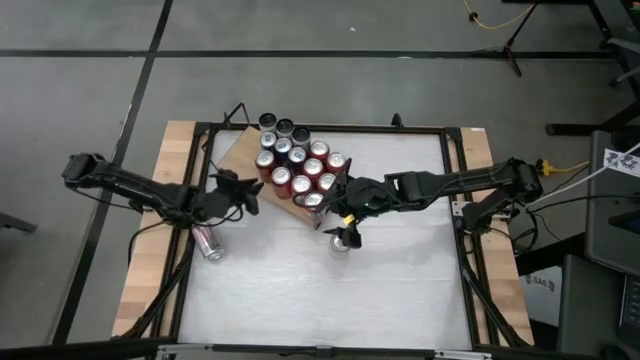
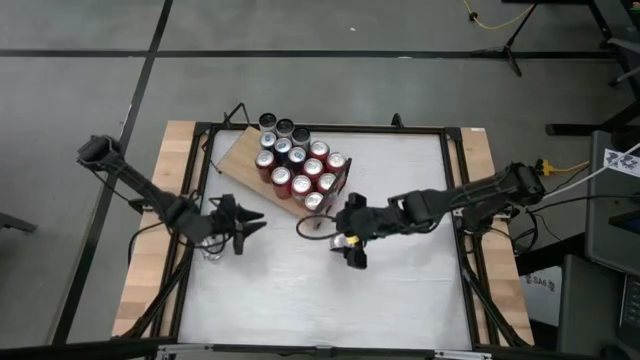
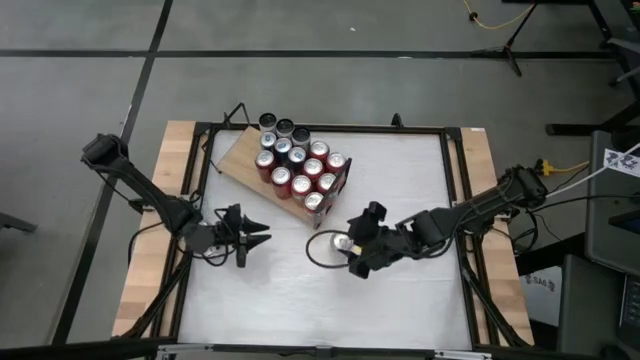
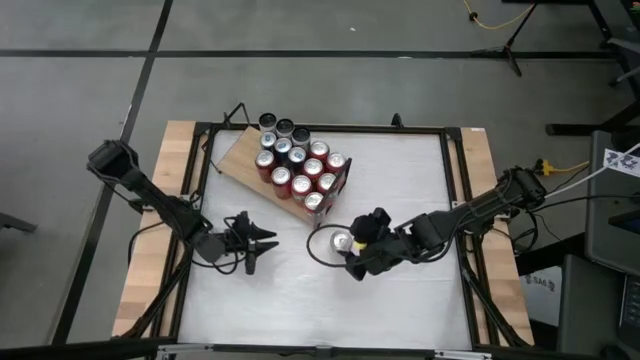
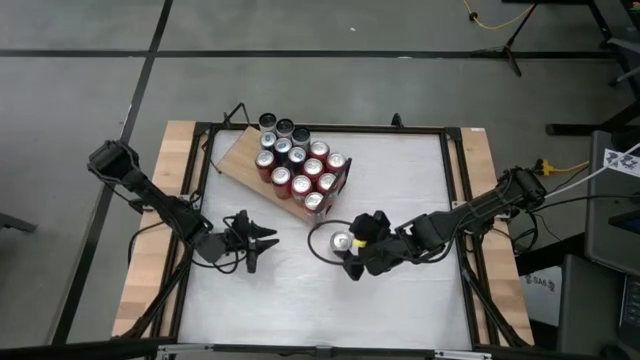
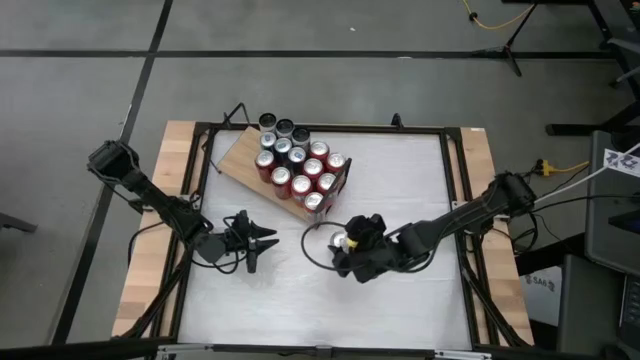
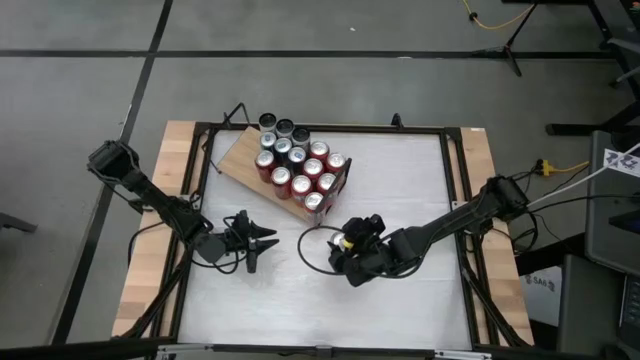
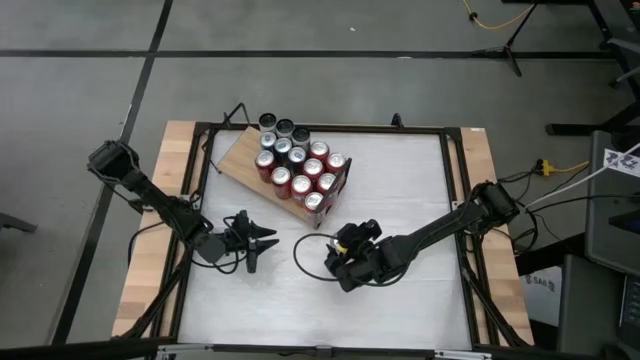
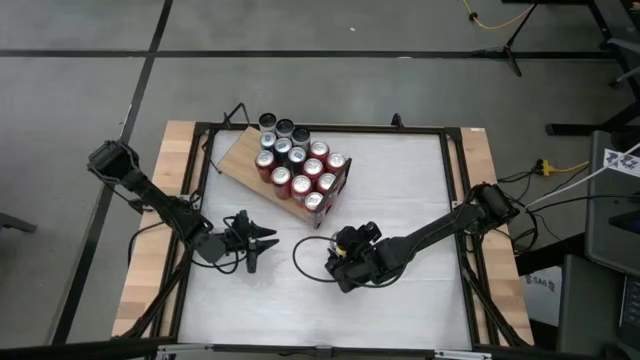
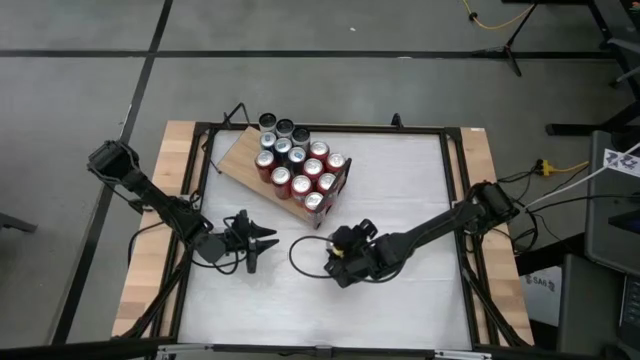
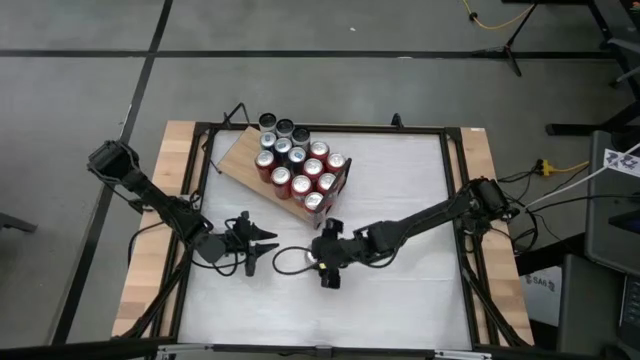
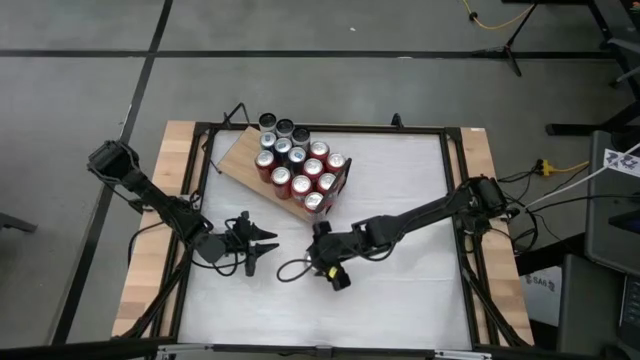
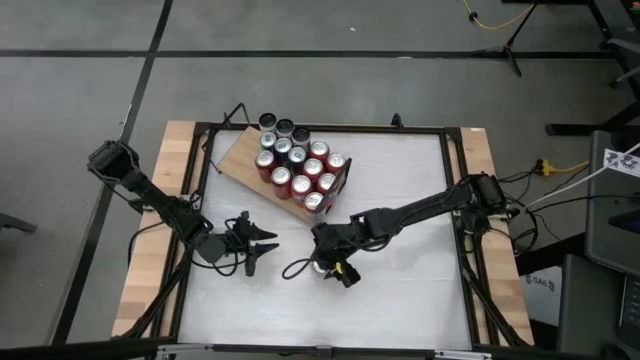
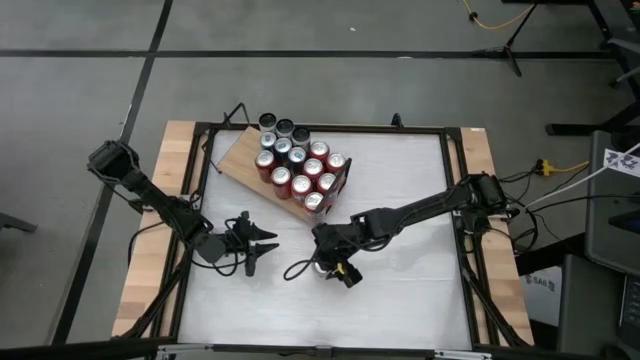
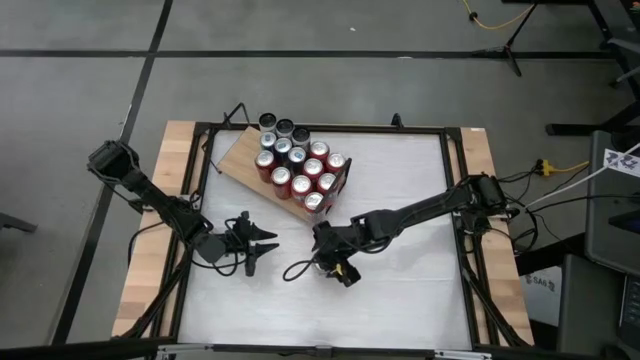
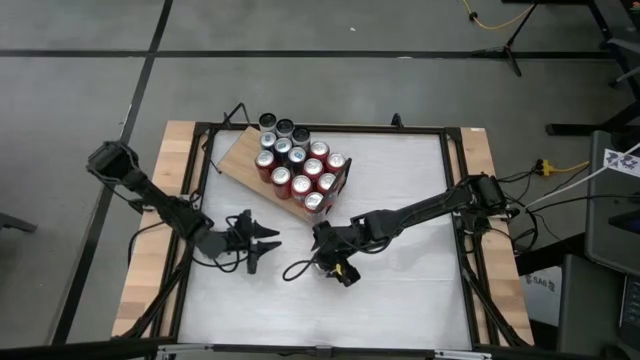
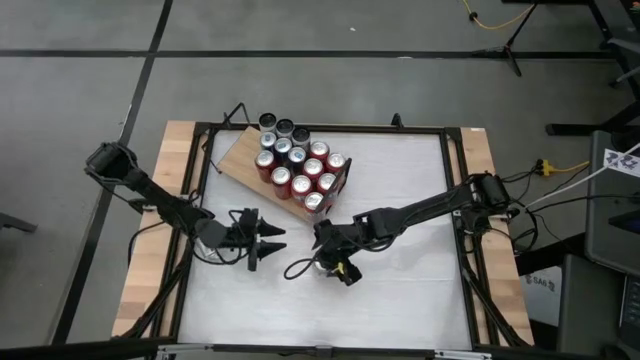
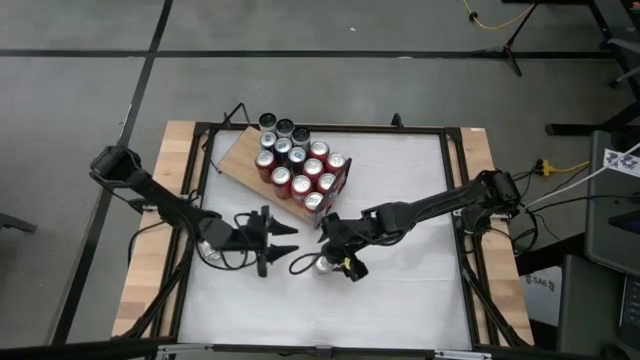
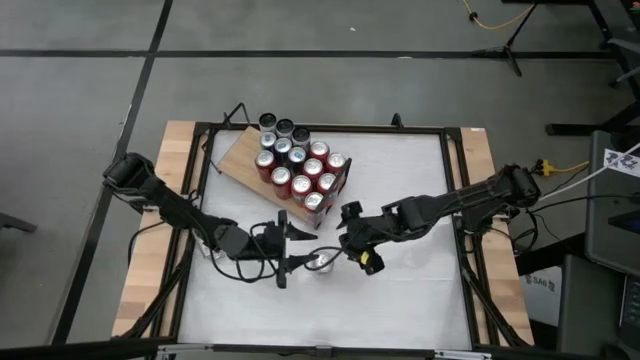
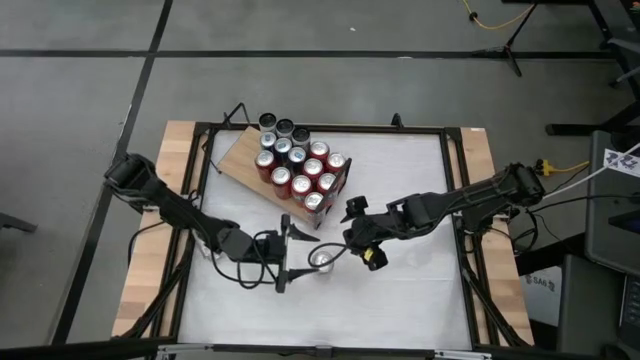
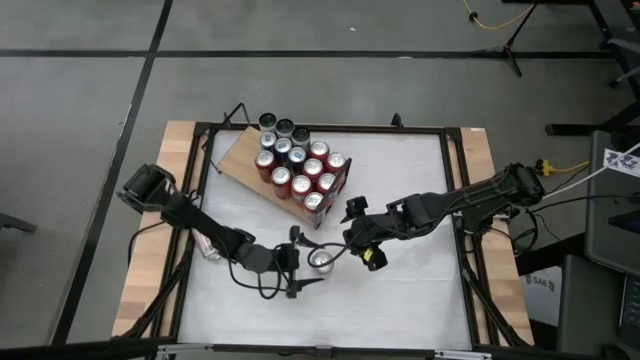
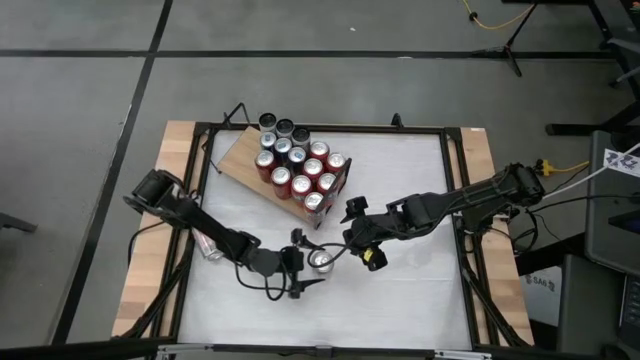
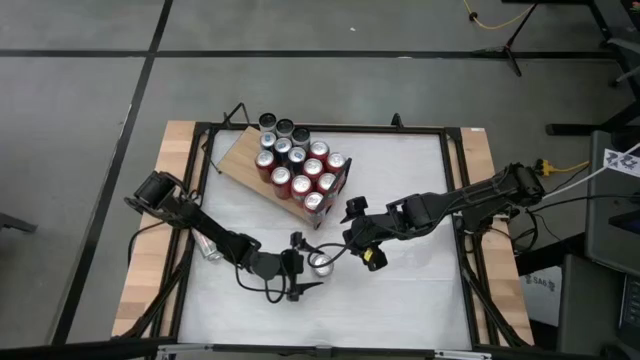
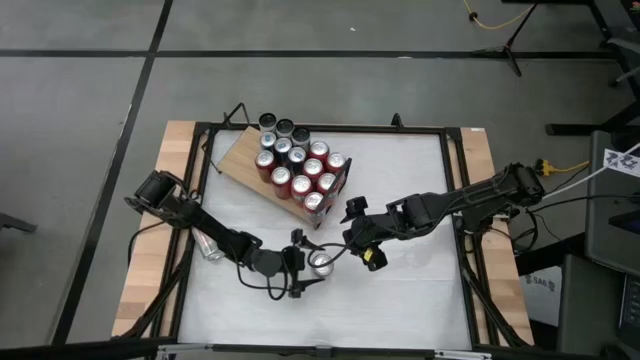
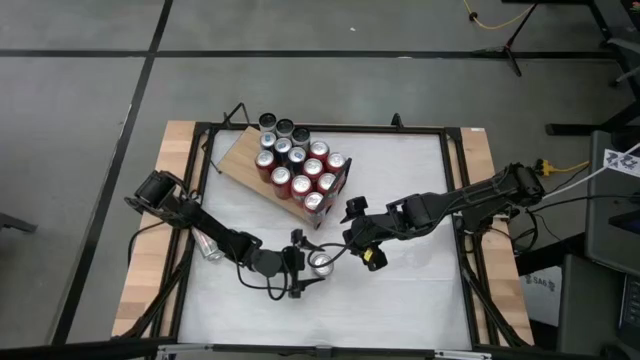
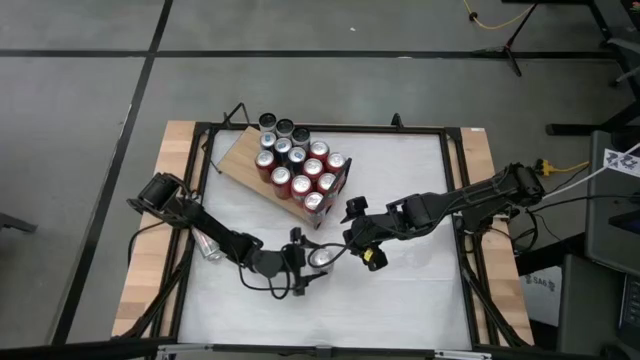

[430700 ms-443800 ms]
Task: Pick and place cans onto a shelf
Put the right red/silver soda can on the shelf

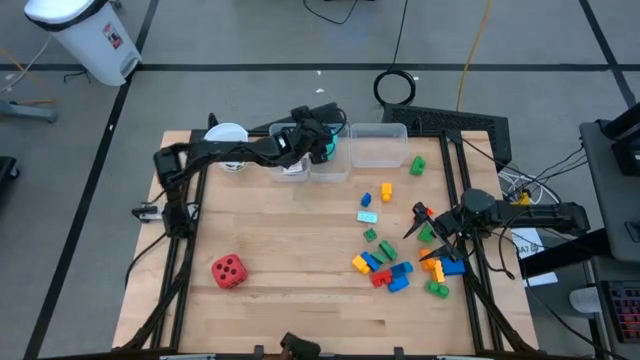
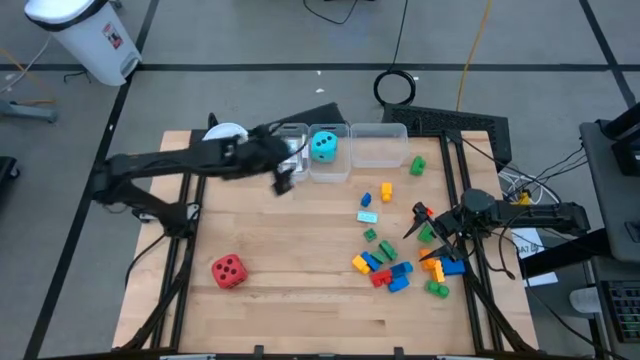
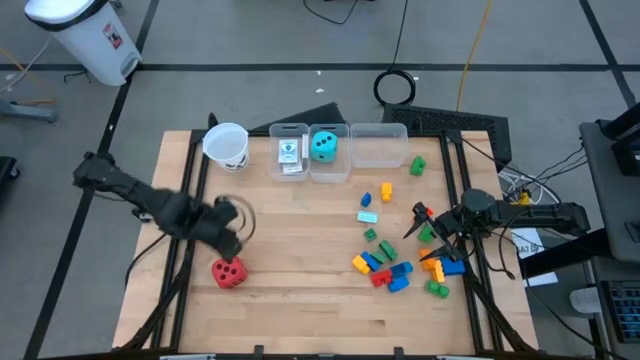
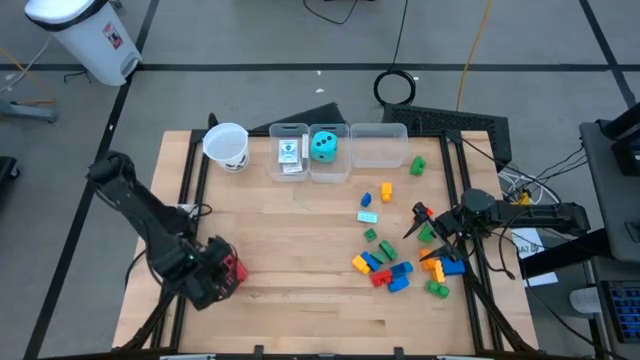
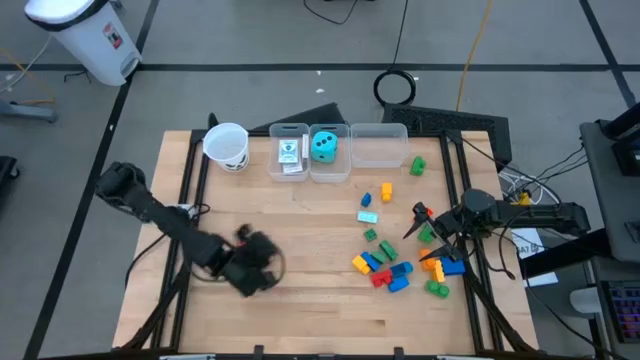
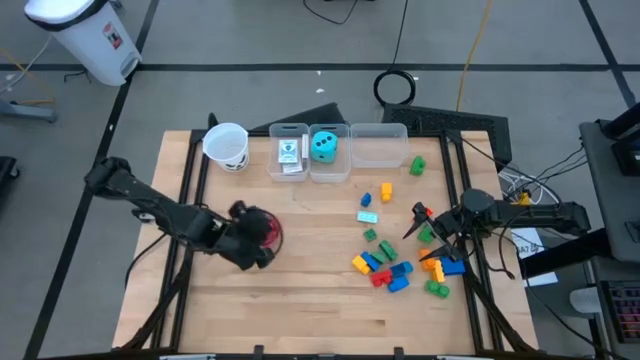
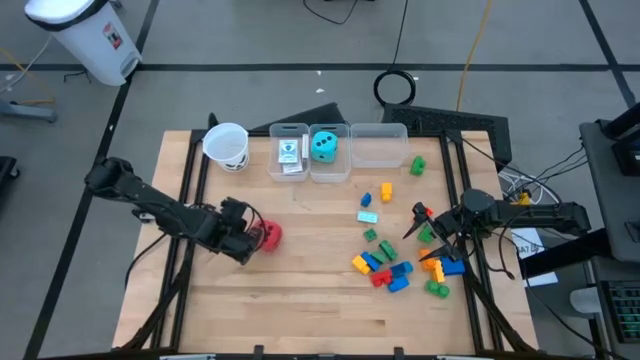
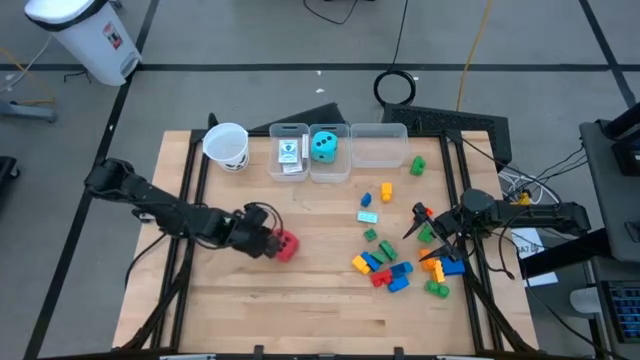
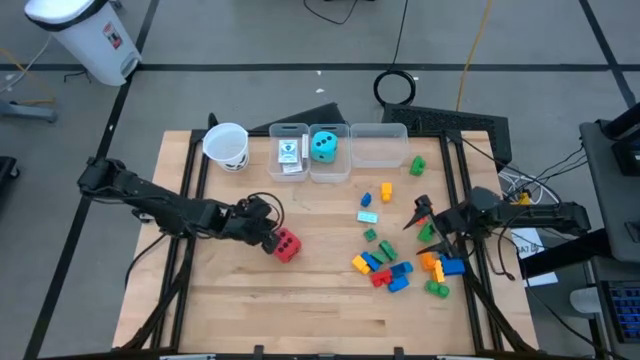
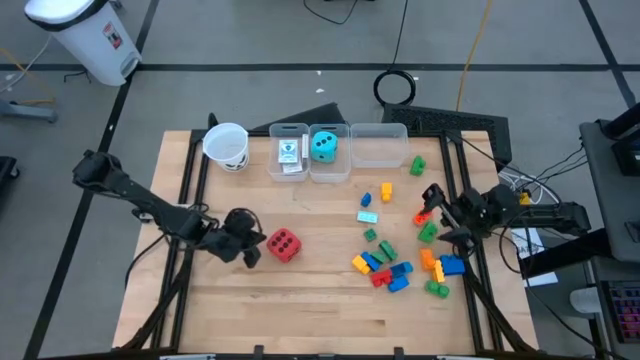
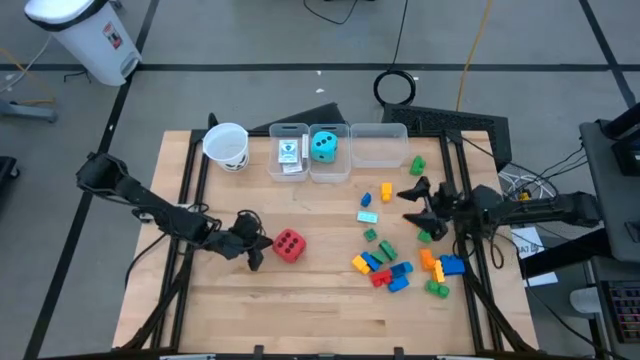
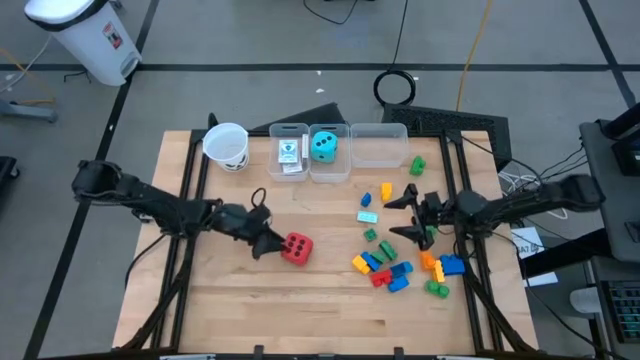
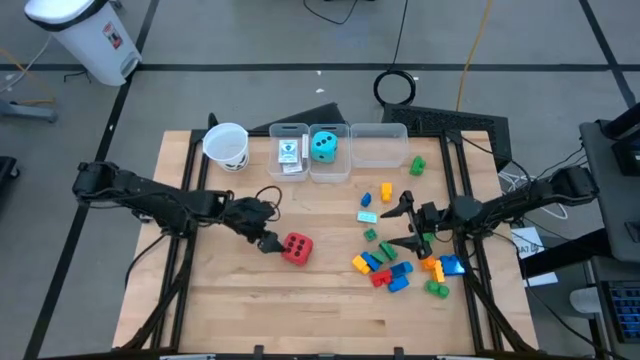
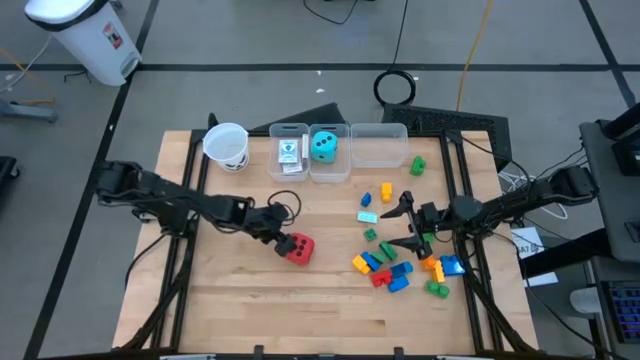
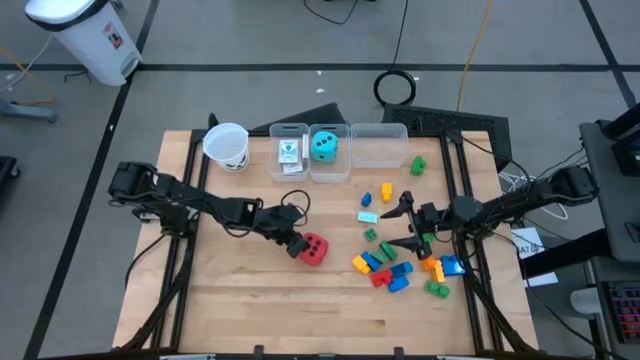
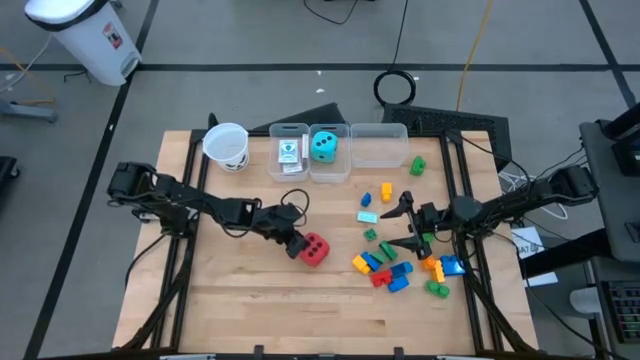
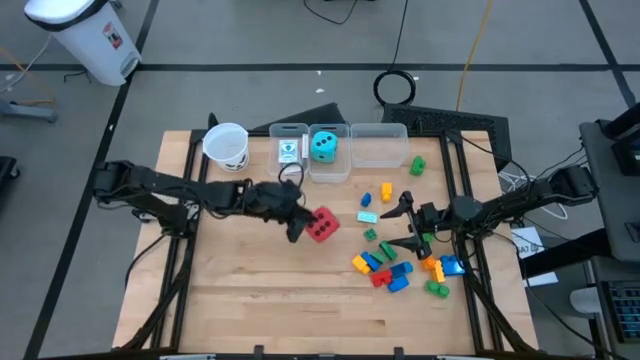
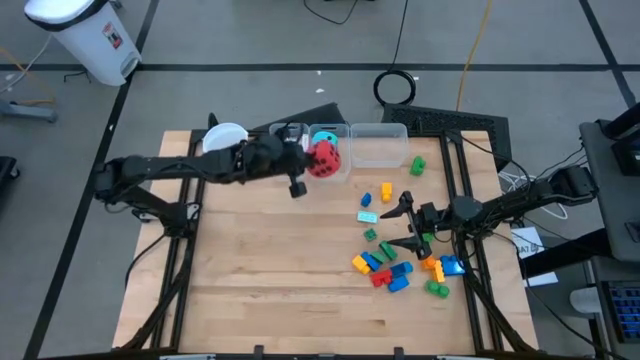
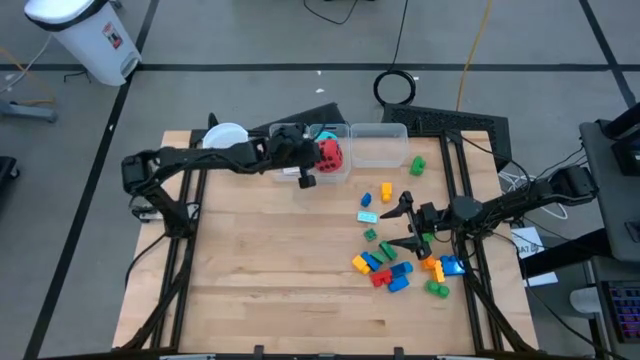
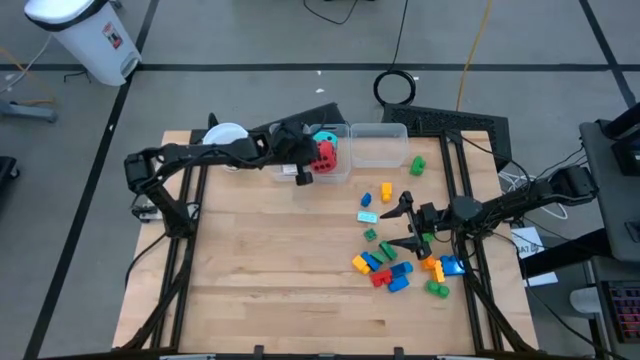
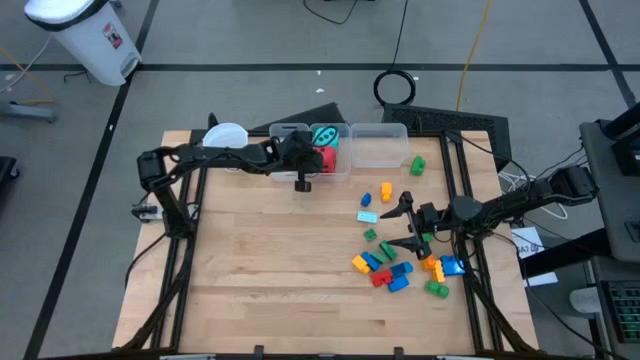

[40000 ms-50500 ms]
Task: Pick & Place Toys
Put the red dice into the middle transparent bin
